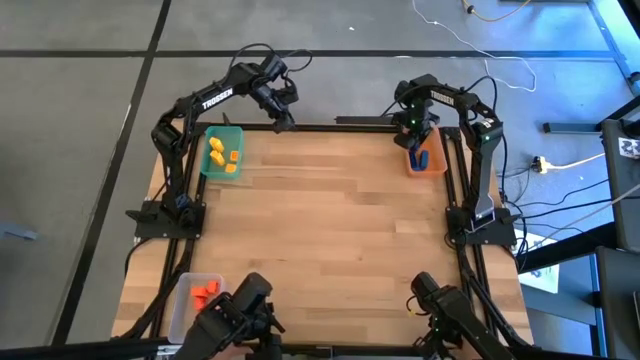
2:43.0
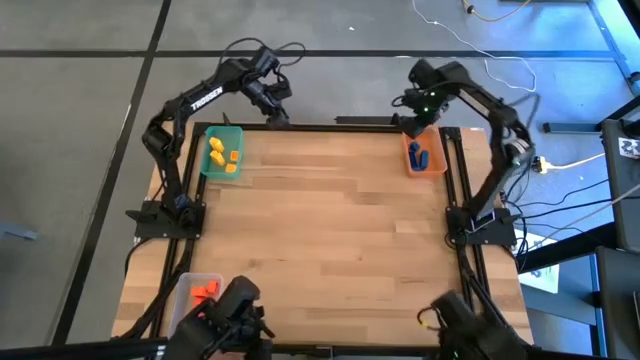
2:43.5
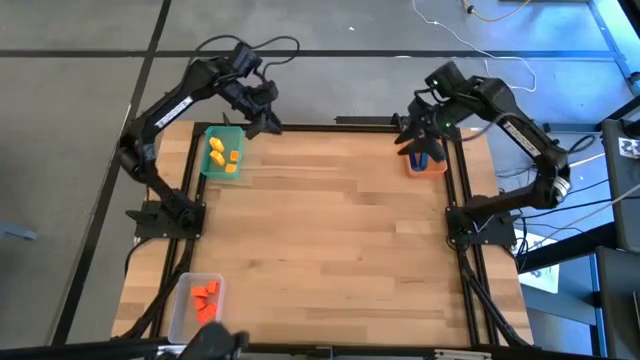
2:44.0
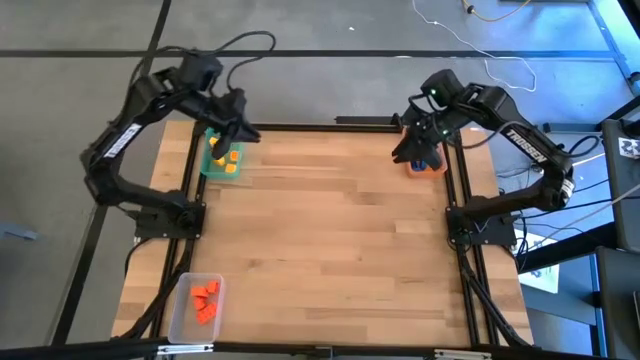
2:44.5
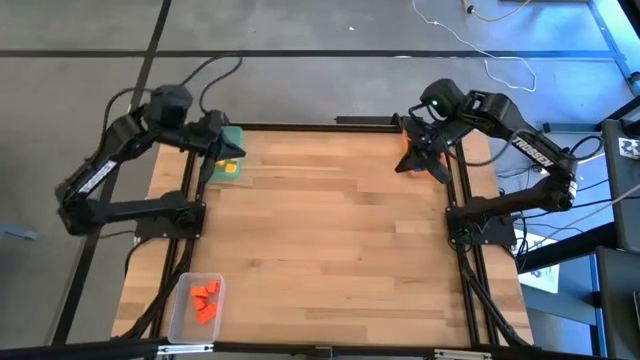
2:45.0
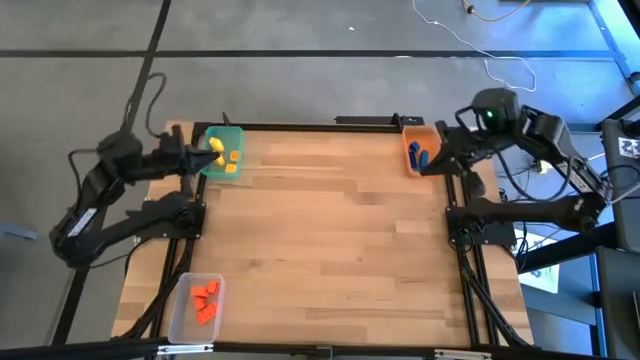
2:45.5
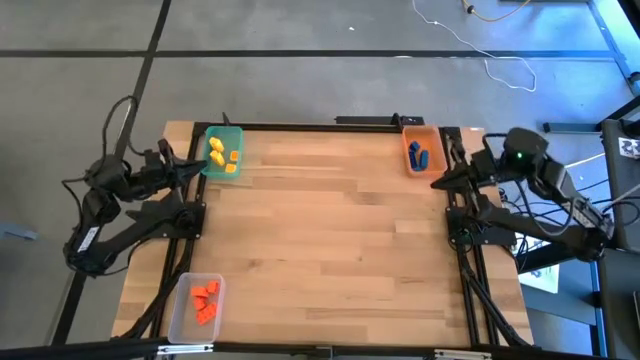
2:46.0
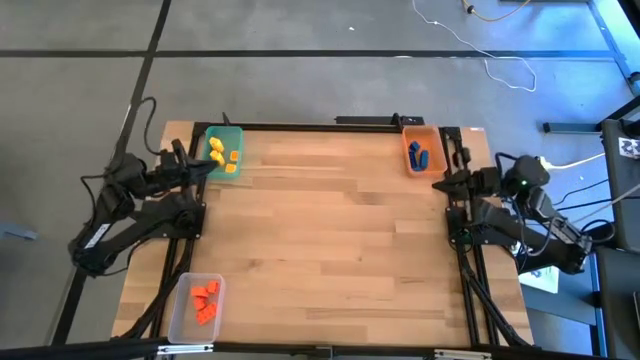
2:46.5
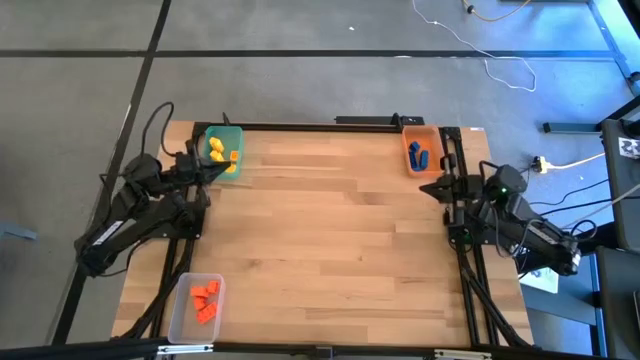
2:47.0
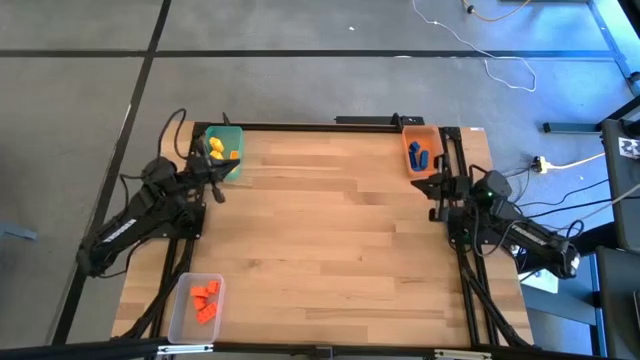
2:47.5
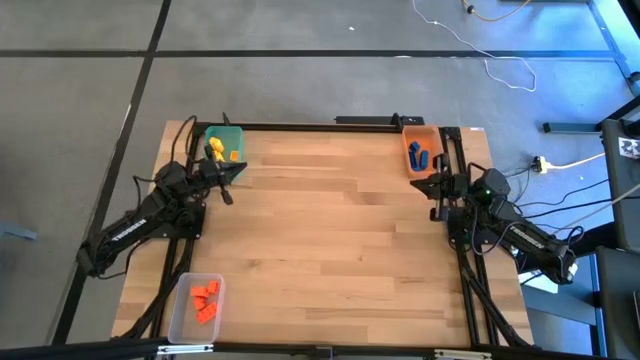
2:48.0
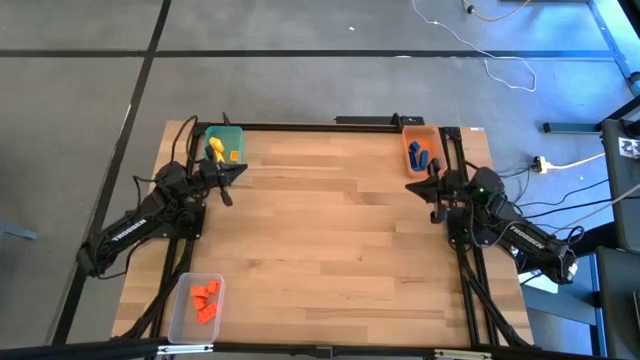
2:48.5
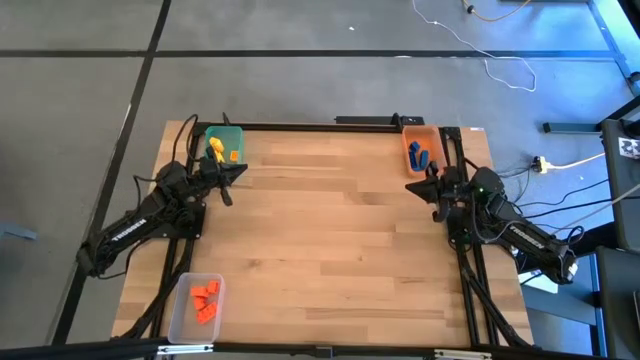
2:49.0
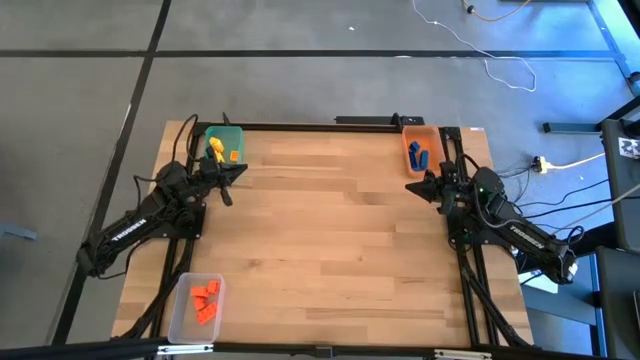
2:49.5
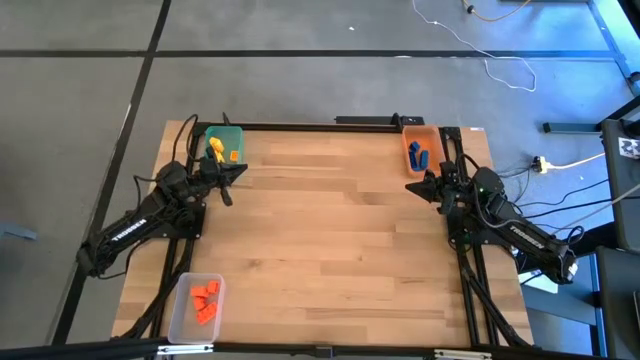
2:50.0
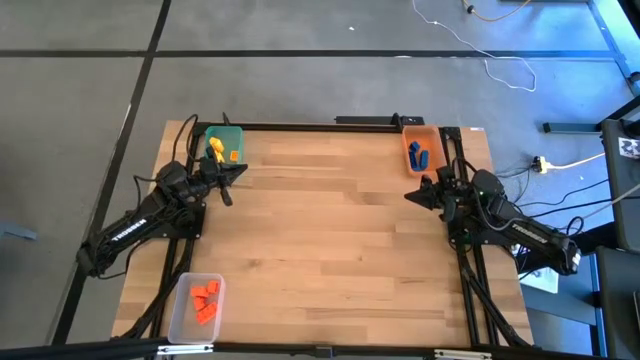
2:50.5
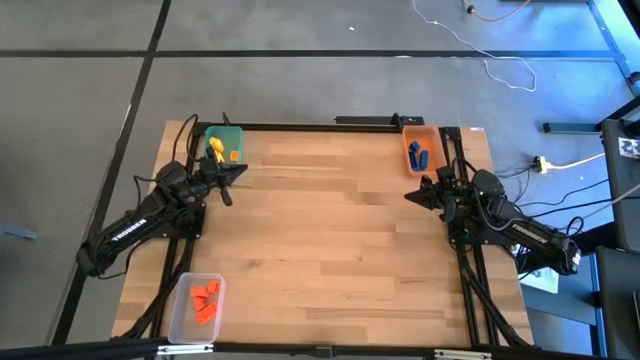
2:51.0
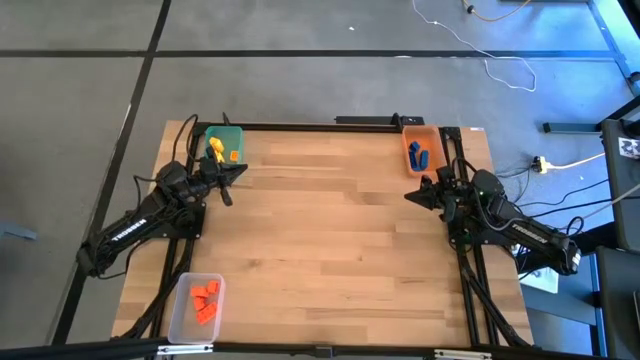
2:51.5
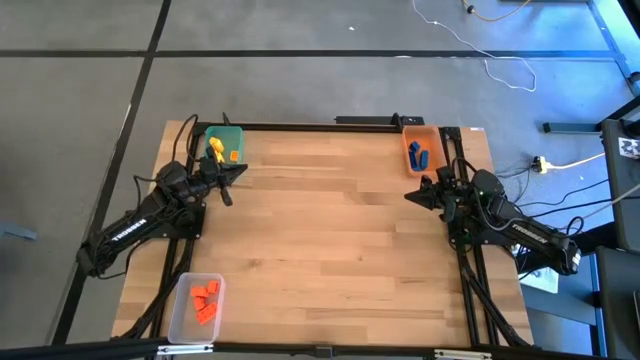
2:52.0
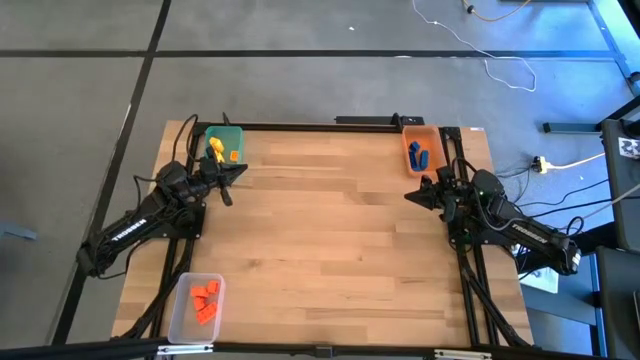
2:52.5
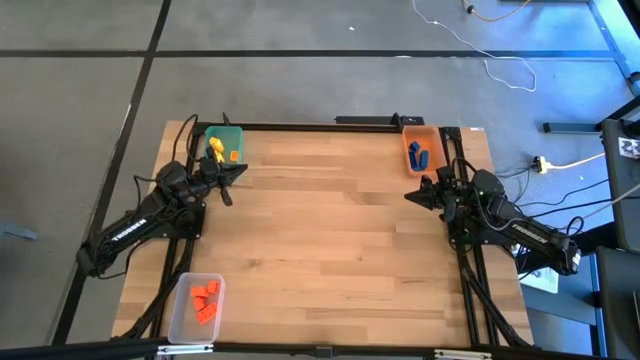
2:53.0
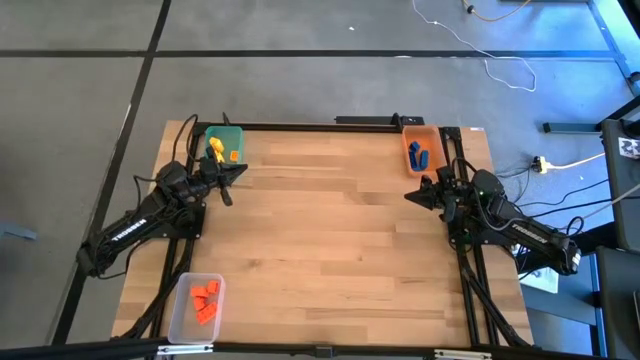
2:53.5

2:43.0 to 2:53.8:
Task: Sort & place blocks by color
Return to Home Position

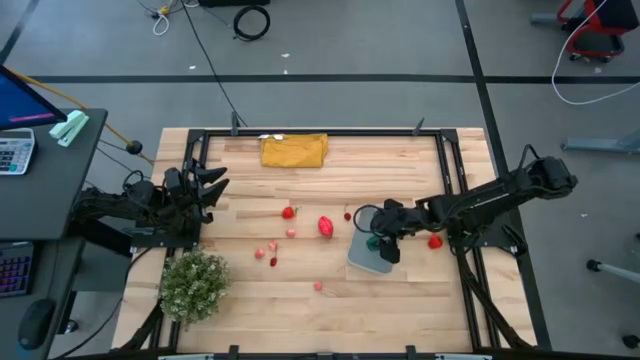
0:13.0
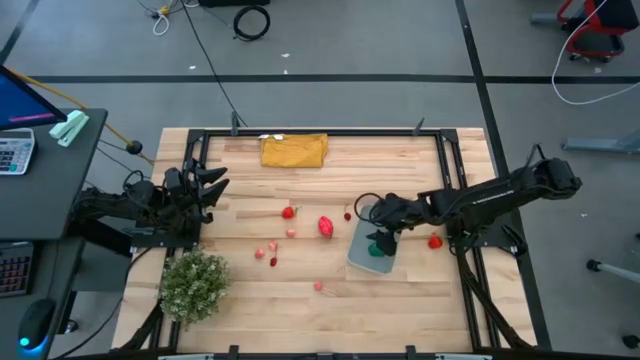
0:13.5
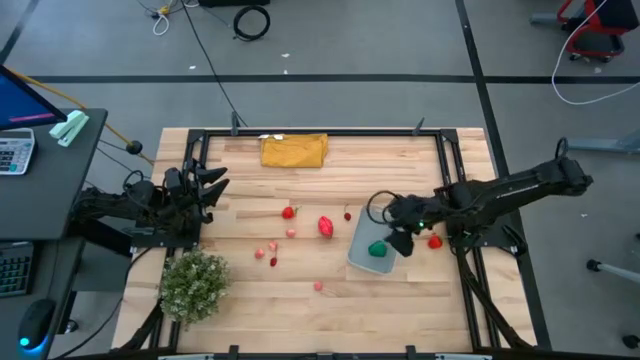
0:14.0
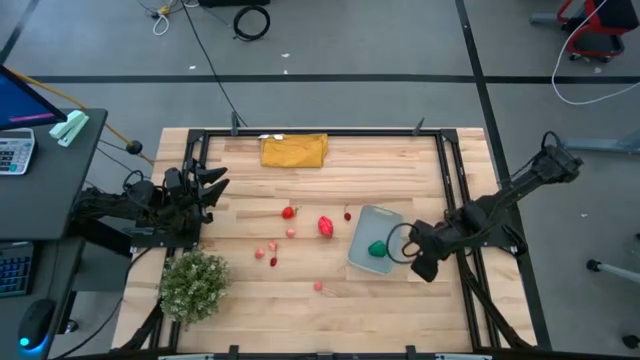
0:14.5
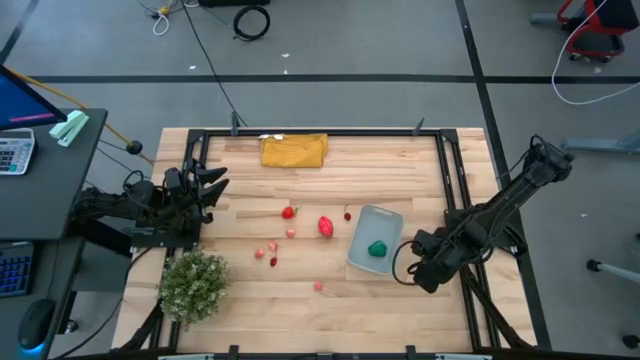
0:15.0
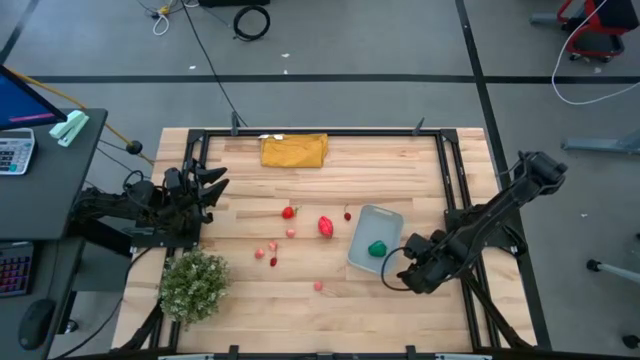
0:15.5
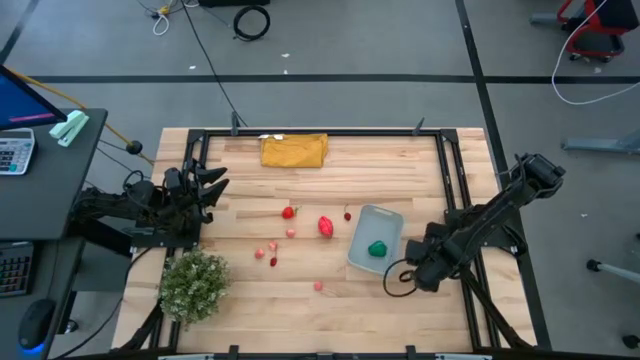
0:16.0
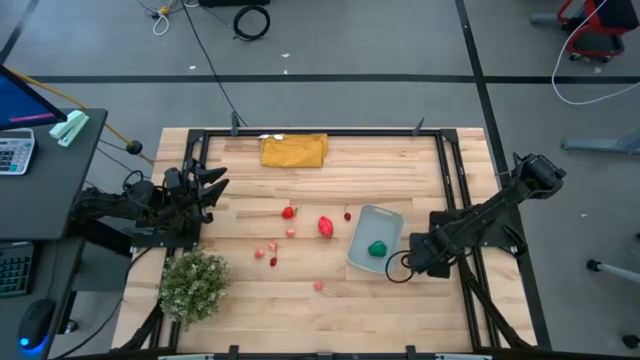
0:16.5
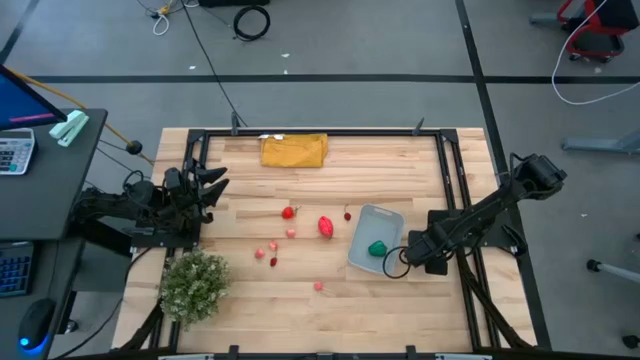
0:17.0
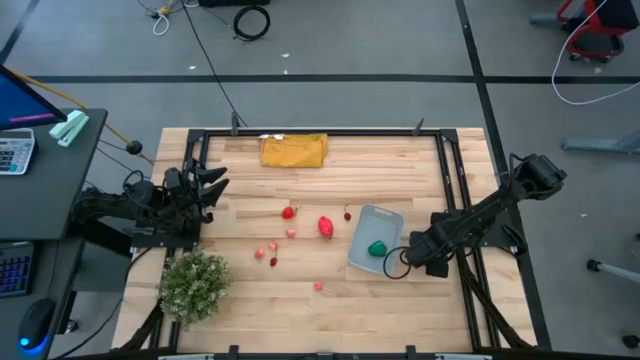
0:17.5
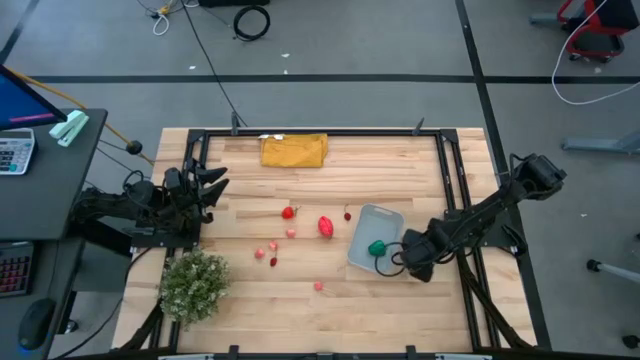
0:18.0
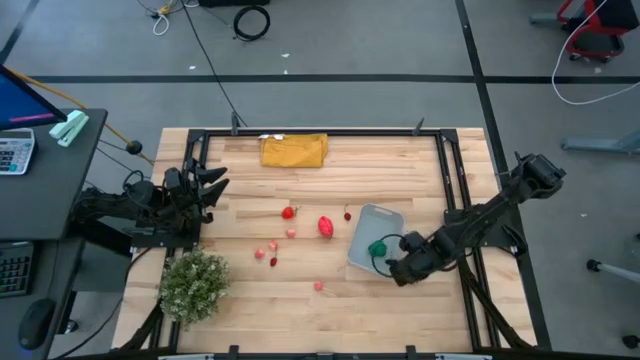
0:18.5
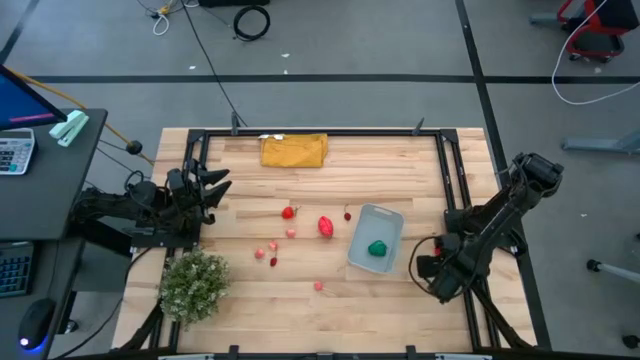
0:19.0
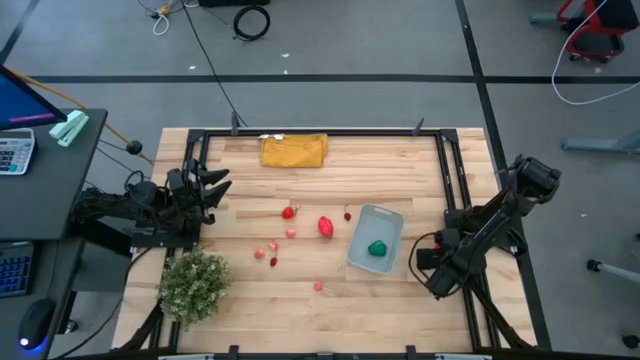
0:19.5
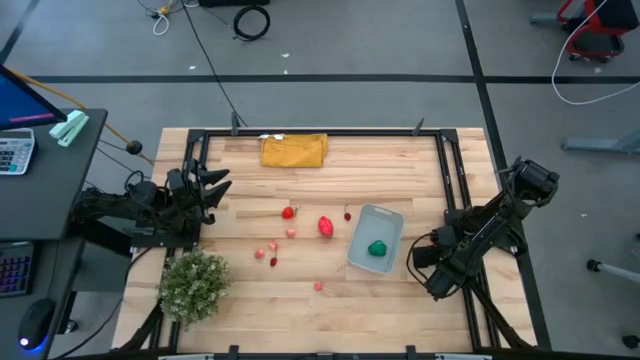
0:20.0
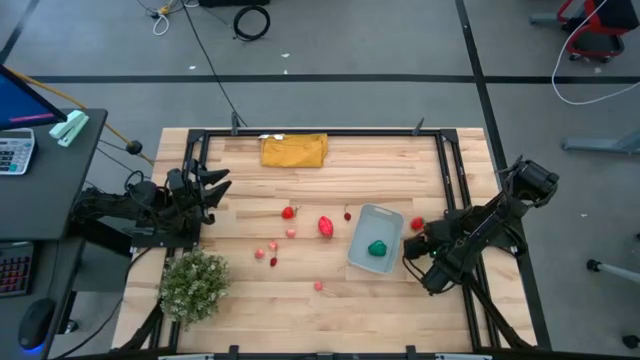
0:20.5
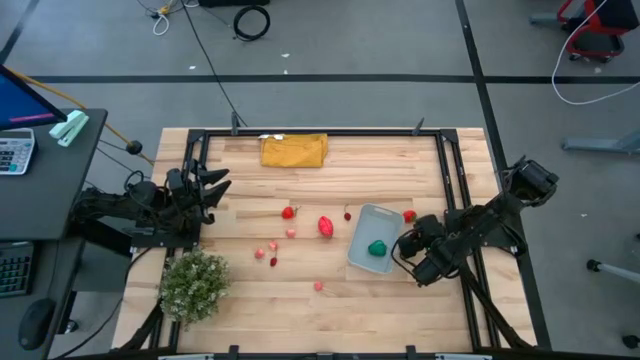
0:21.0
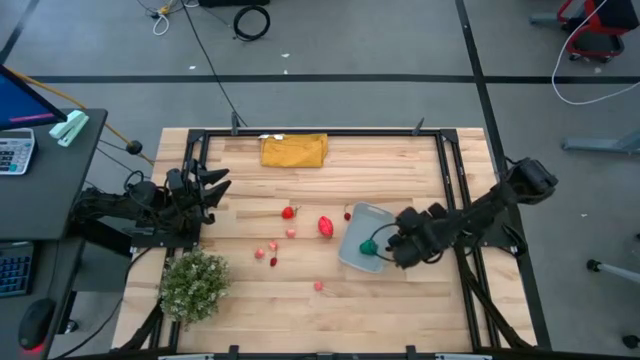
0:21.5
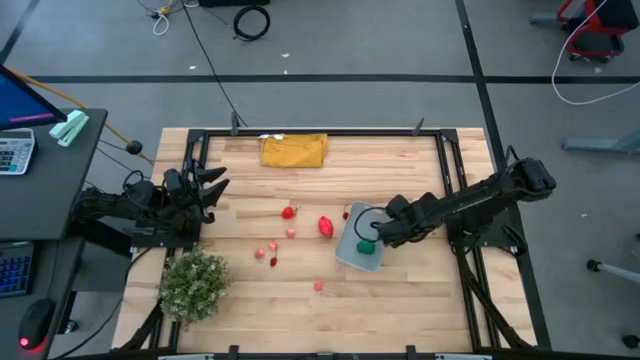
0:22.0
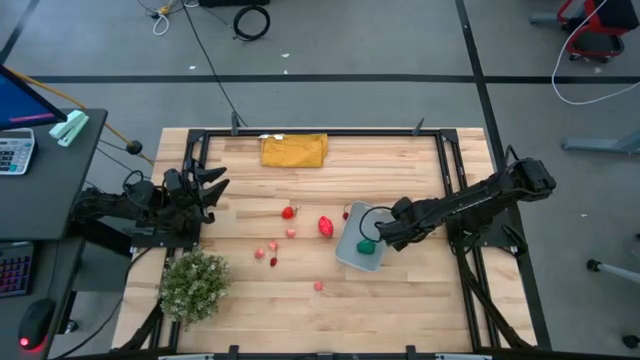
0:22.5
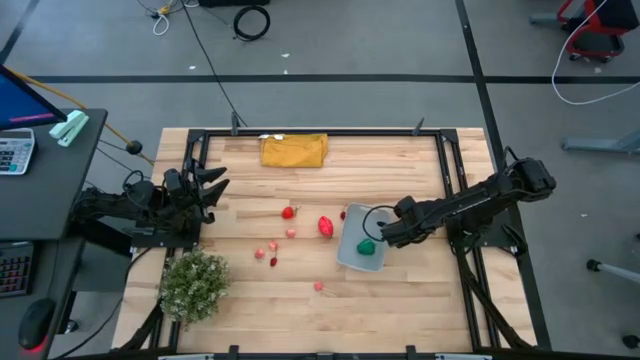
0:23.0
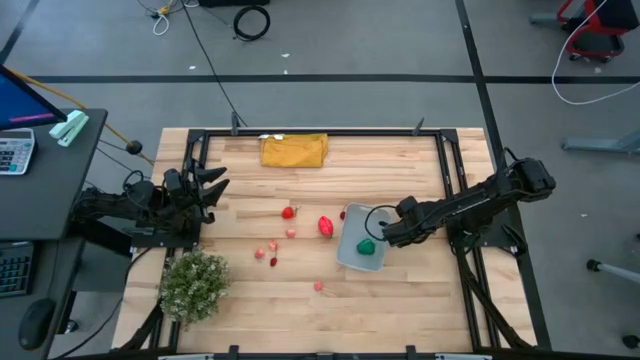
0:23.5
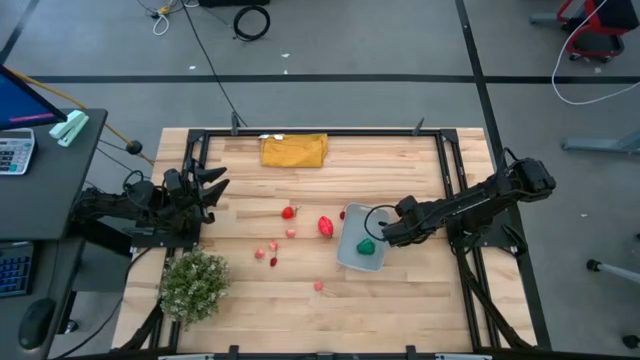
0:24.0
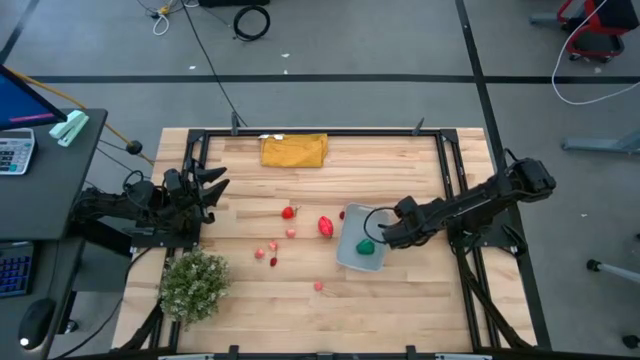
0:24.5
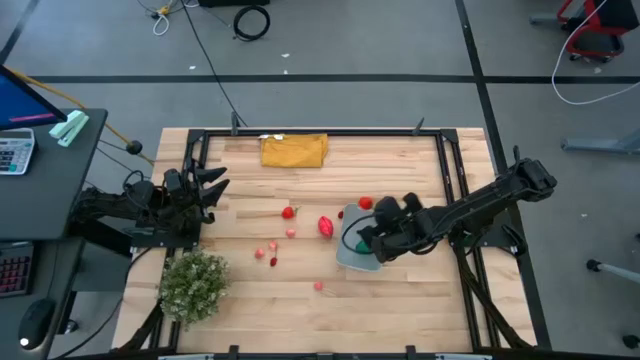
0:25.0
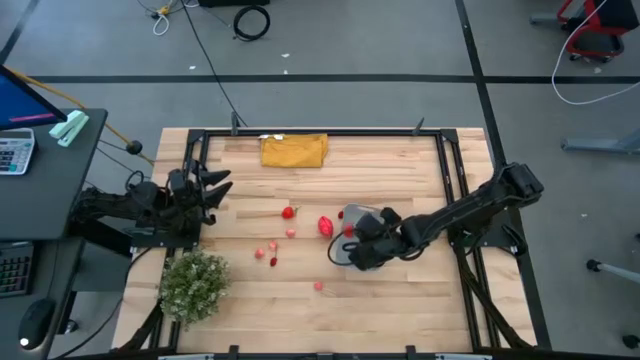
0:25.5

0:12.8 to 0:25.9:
Task: Pick and placing Produce into tupperware
Put the red strawberry into the gray bin
